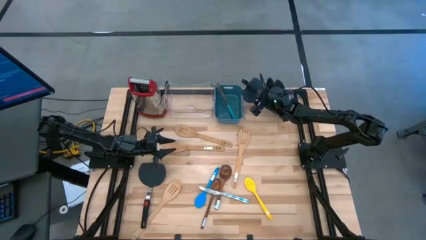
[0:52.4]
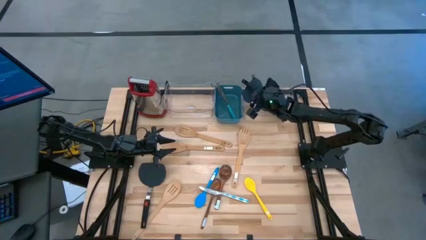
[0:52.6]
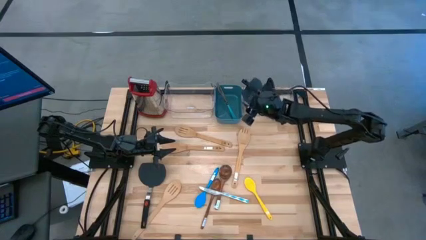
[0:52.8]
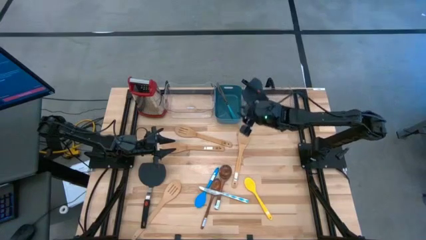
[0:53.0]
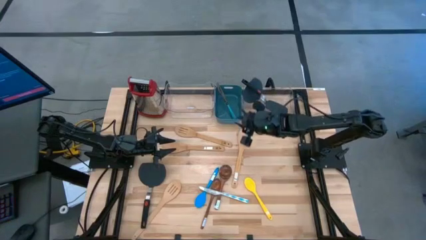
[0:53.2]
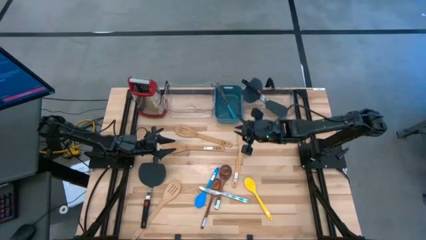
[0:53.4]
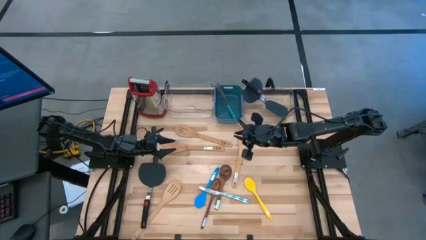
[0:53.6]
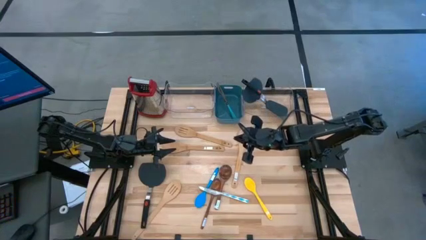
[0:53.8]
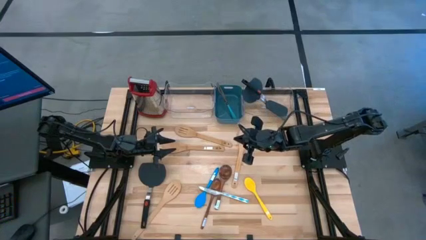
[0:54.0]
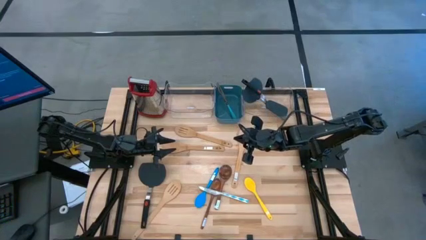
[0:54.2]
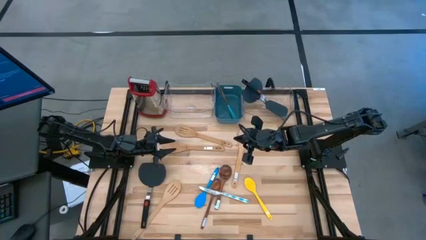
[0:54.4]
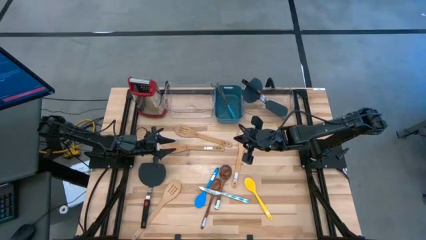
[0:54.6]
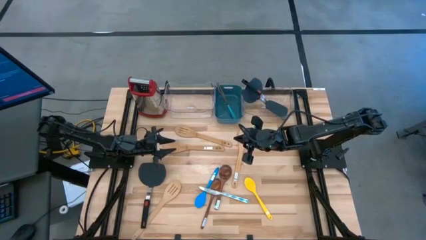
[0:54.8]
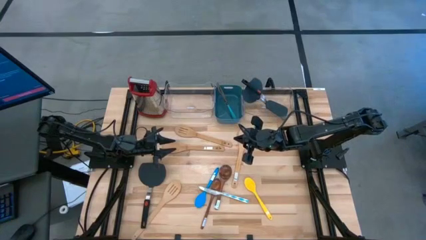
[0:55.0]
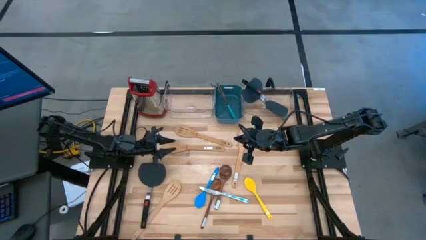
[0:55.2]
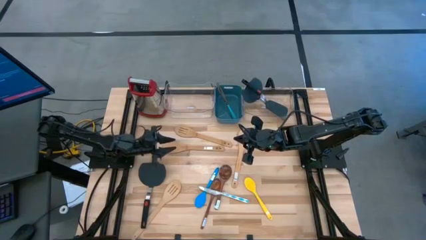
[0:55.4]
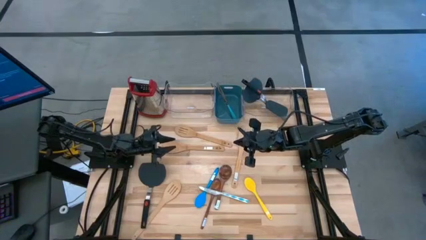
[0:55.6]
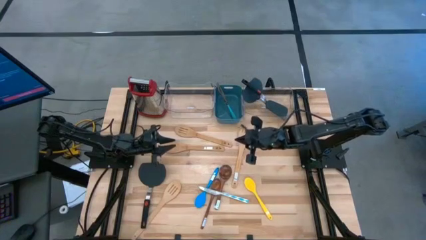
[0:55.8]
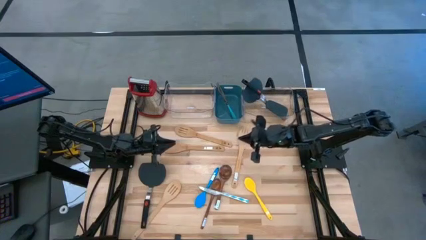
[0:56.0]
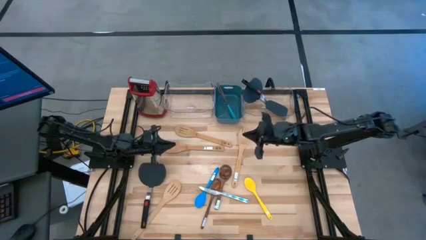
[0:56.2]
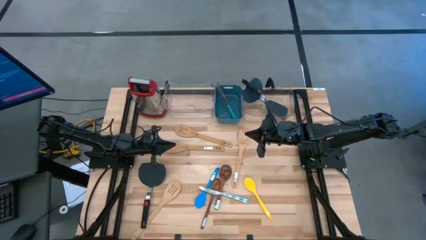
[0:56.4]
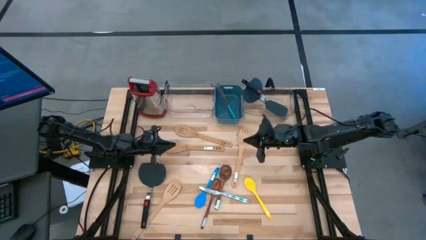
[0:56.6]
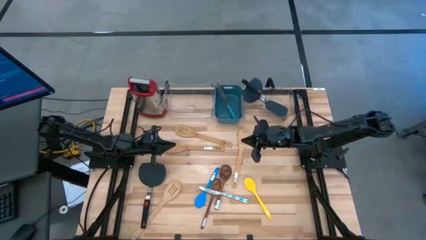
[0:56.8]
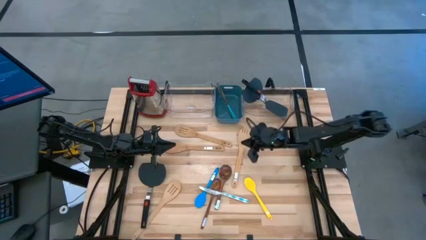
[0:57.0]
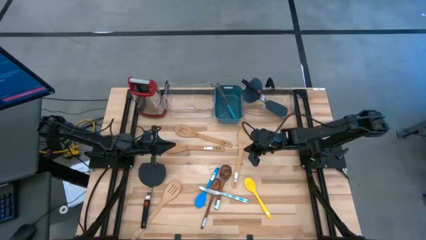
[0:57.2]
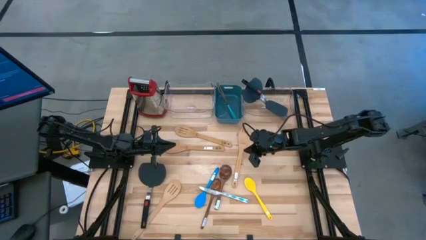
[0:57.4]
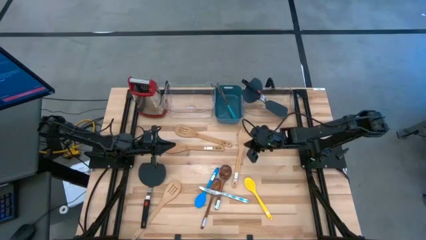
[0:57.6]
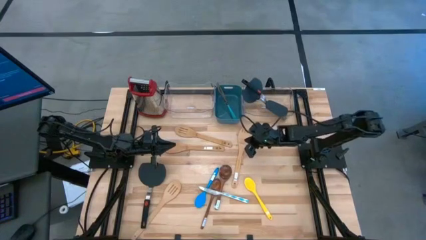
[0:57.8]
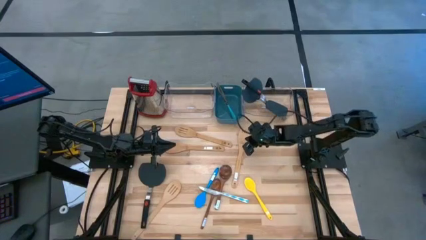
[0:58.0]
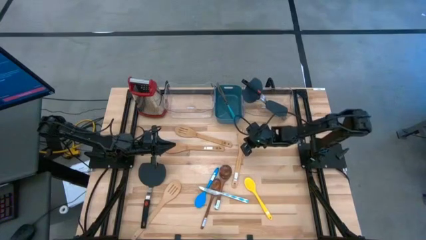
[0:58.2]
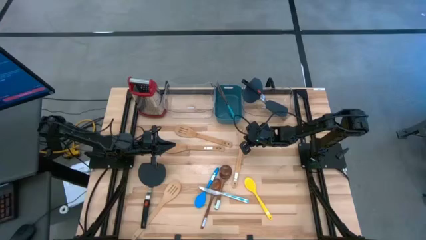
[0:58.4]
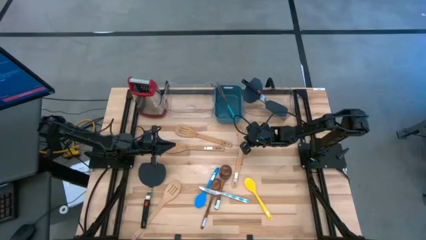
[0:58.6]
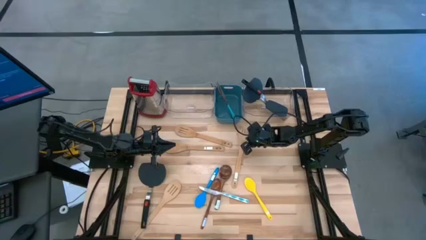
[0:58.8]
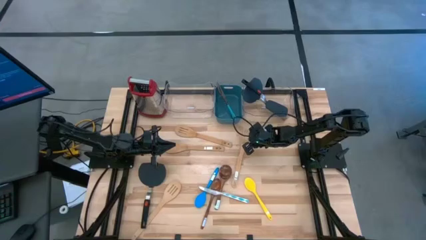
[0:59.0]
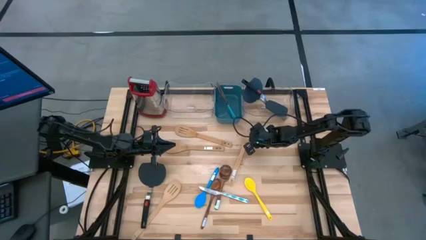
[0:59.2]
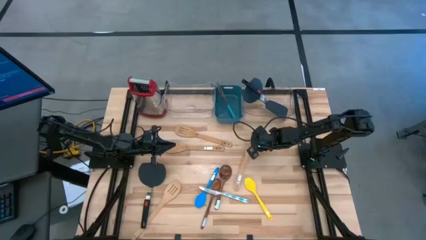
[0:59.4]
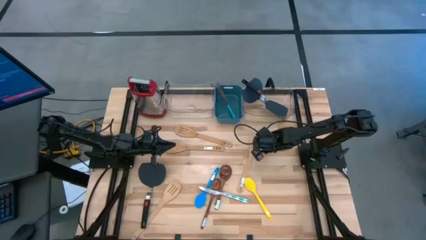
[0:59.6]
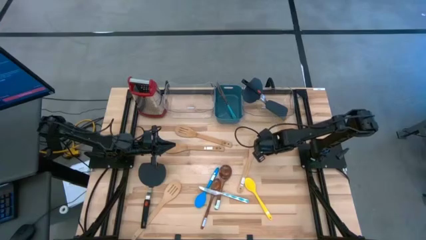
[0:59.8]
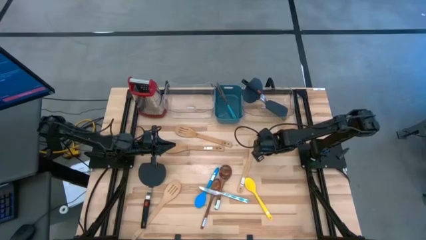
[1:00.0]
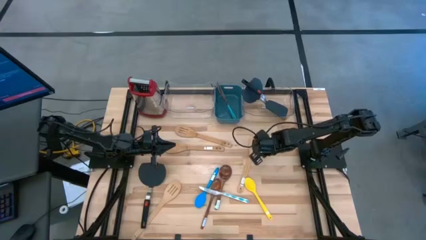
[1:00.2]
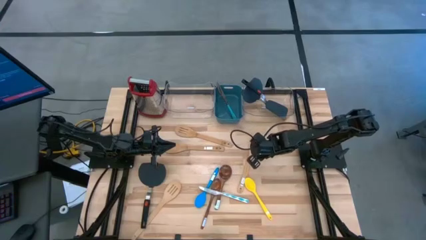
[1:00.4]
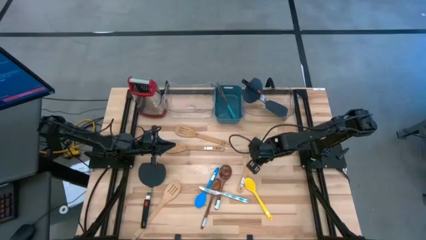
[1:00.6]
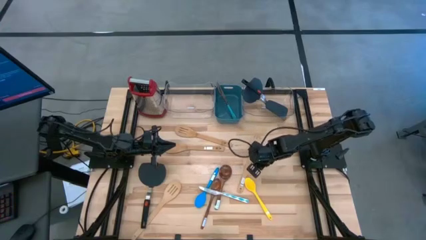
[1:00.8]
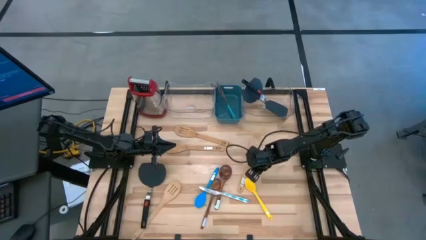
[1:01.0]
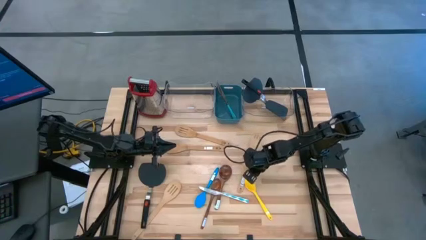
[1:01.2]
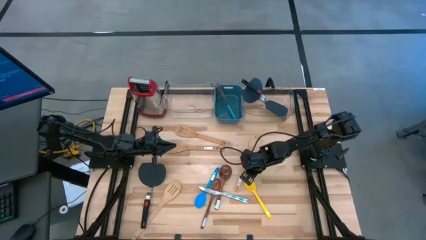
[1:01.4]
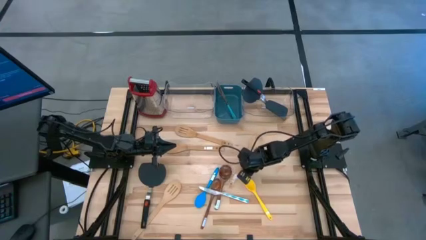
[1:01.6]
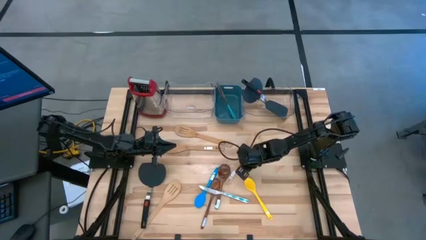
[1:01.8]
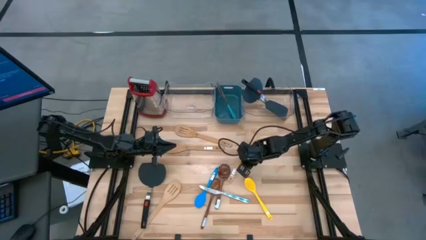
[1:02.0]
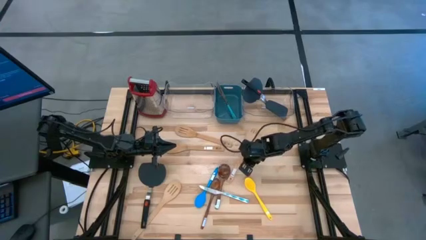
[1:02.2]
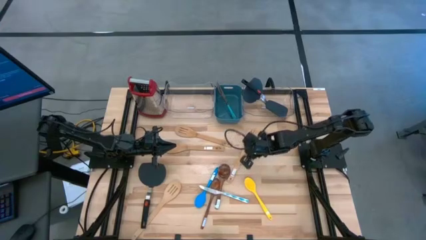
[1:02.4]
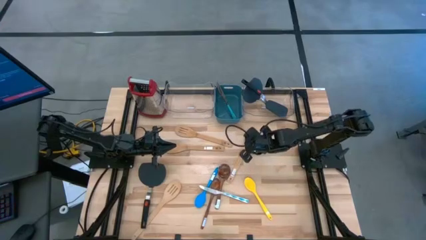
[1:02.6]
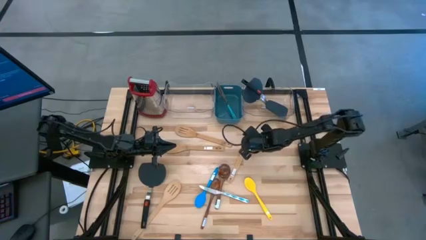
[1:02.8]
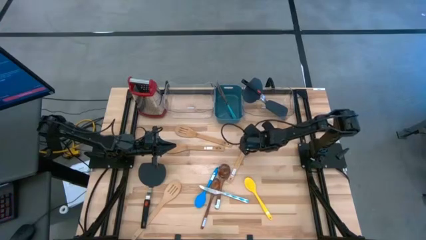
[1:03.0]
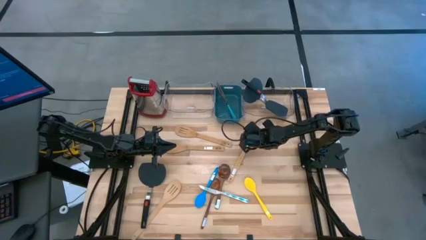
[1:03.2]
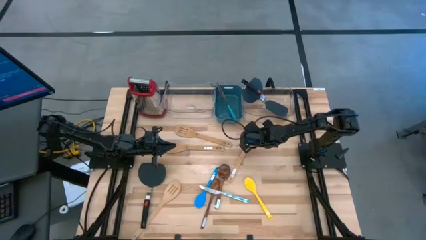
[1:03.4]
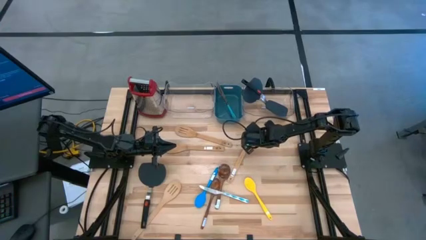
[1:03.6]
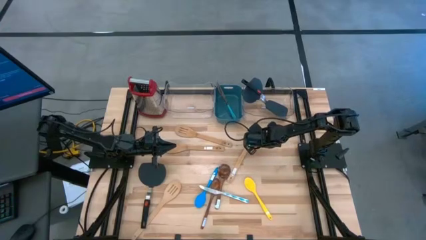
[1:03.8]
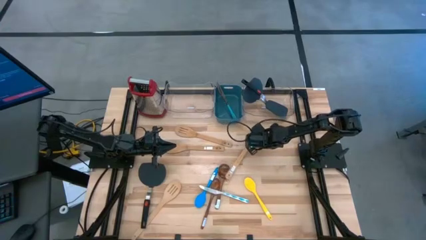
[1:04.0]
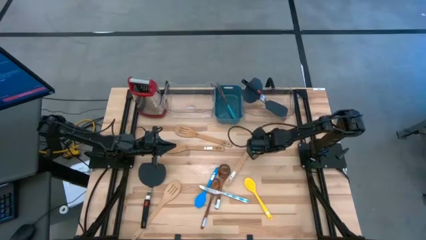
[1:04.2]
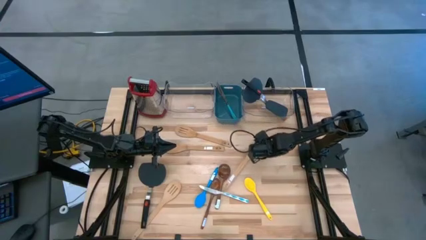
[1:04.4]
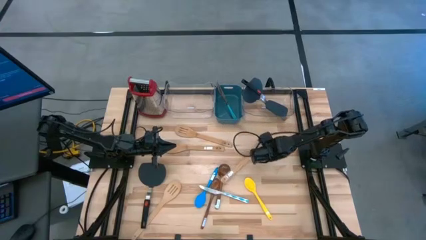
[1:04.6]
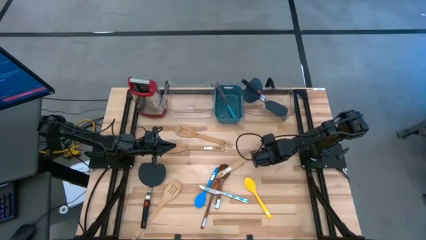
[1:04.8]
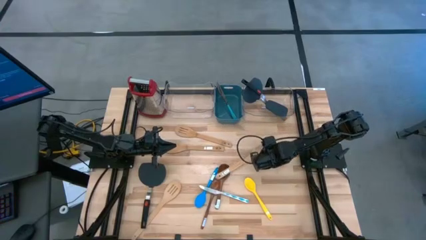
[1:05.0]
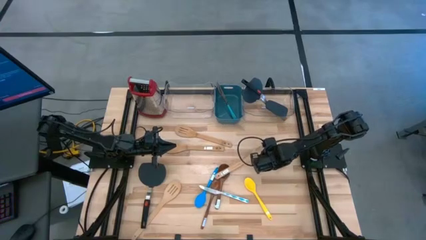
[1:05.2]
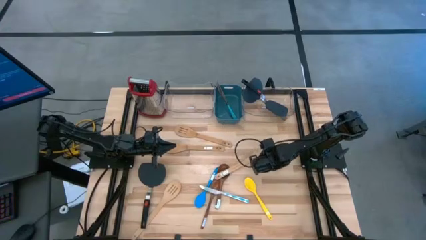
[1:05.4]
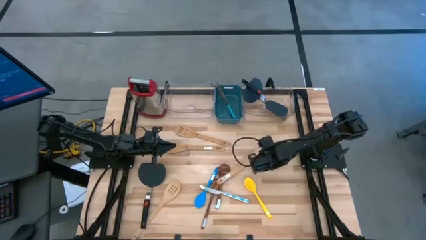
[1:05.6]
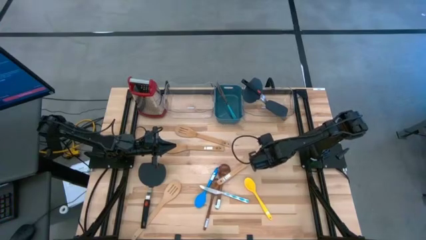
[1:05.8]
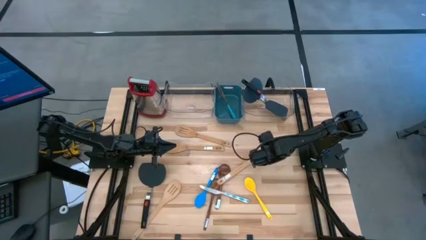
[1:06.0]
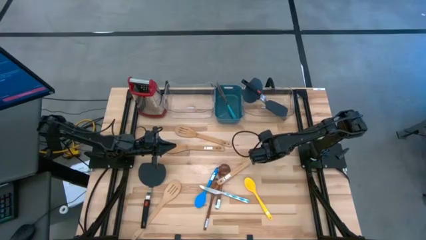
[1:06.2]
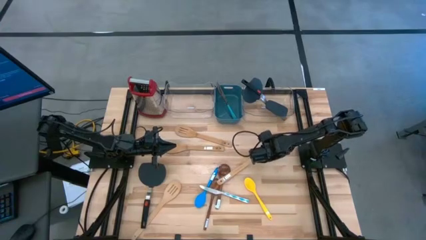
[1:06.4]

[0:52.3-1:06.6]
Task: Pick & Place Kitchen Items
Put the brown spork into the left transparent bin

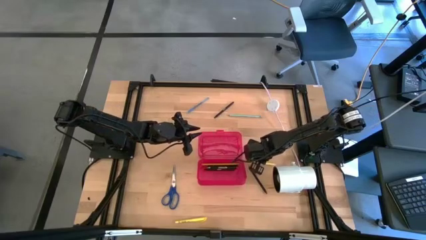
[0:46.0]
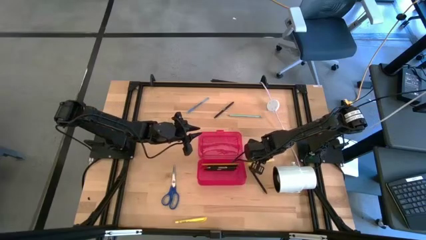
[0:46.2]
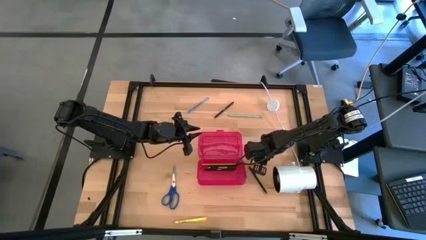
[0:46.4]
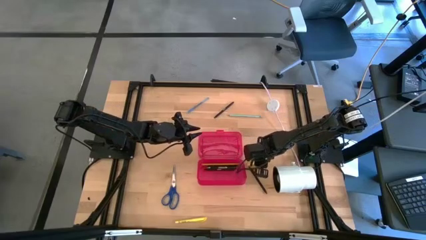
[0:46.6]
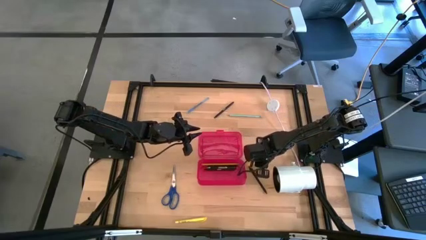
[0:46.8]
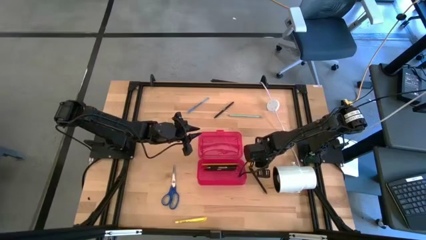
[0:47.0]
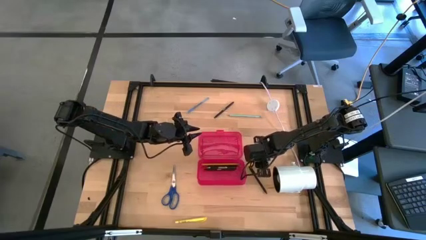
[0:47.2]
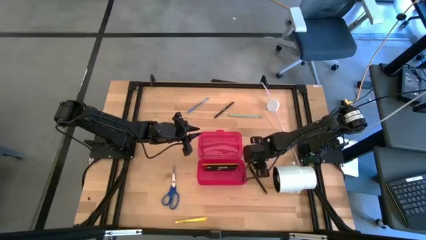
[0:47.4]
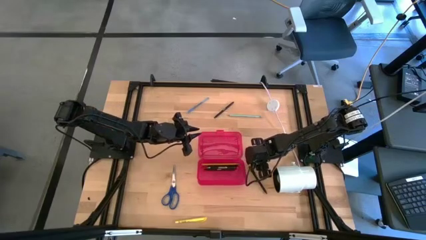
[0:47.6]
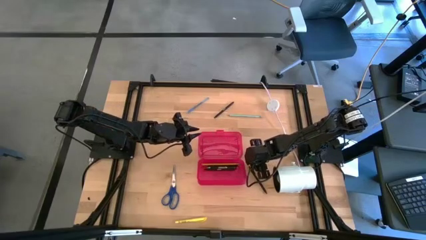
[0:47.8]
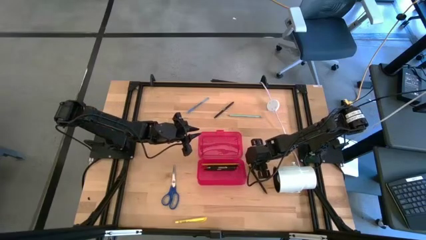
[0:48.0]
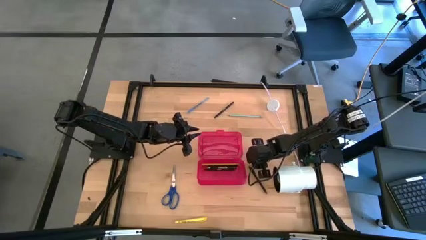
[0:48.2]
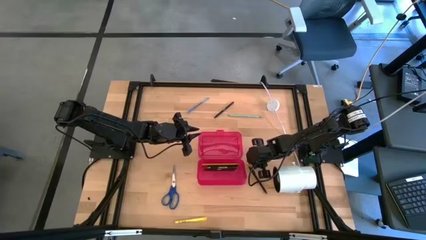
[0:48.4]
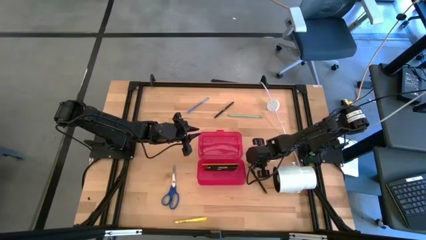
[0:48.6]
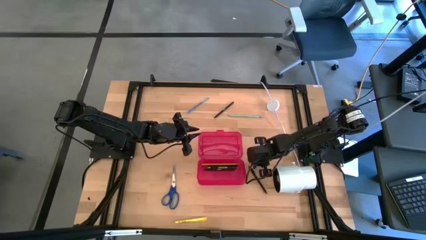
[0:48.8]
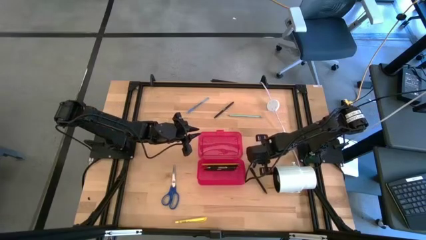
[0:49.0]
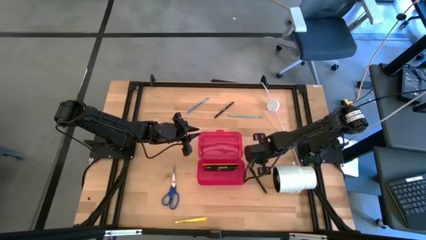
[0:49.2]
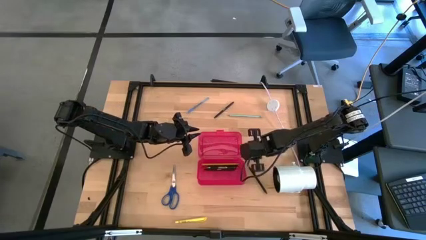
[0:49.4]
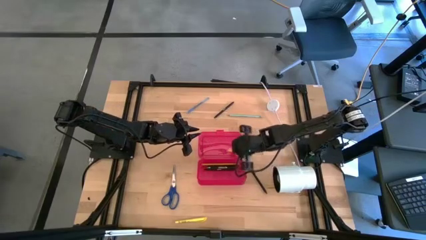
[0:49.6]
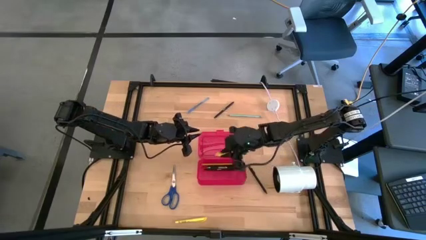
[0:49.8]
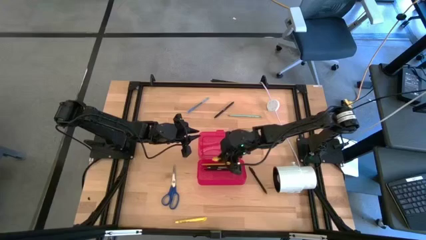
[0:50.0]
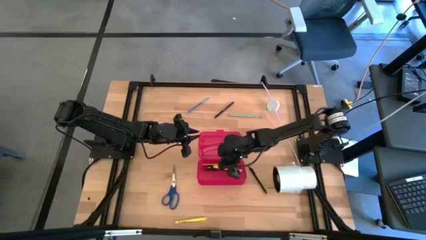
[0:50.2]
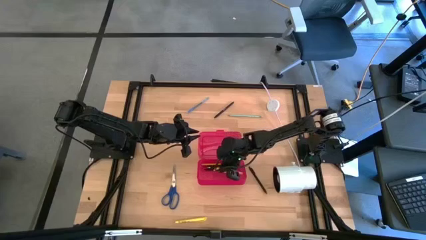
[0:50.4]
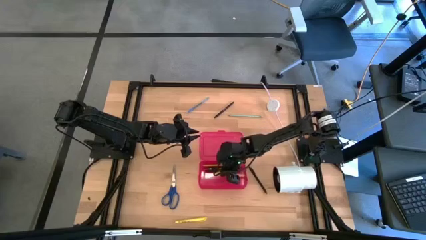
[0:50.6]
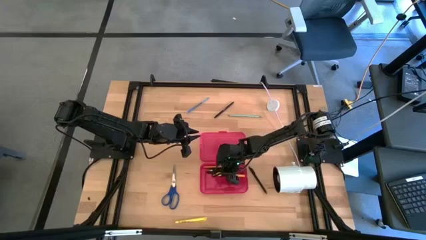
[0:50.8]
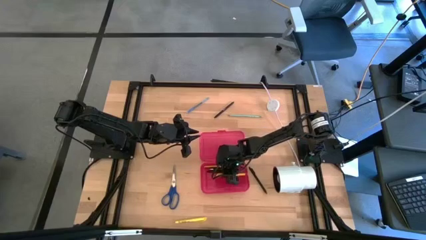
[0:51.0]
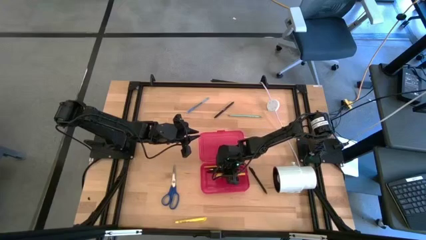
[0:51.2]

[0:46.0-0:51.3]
Task: Pick & place school supplies into a supply box
Put the top yellow pen into the red supply box
